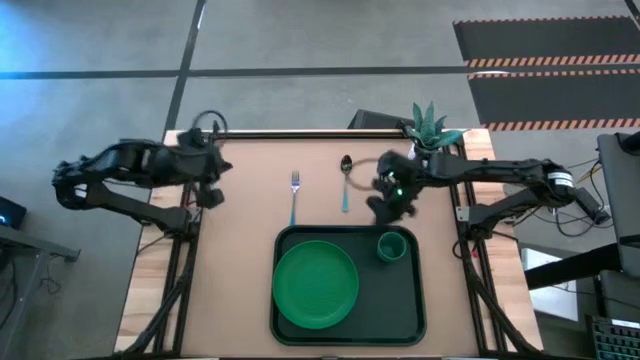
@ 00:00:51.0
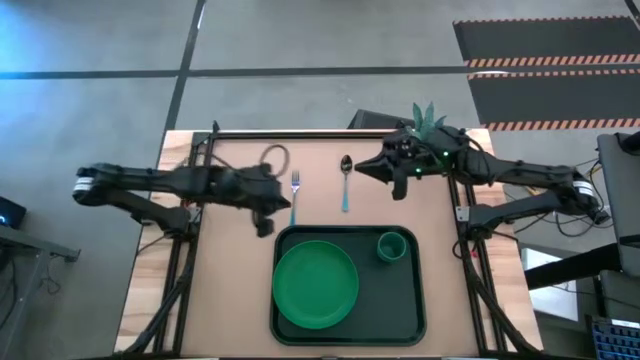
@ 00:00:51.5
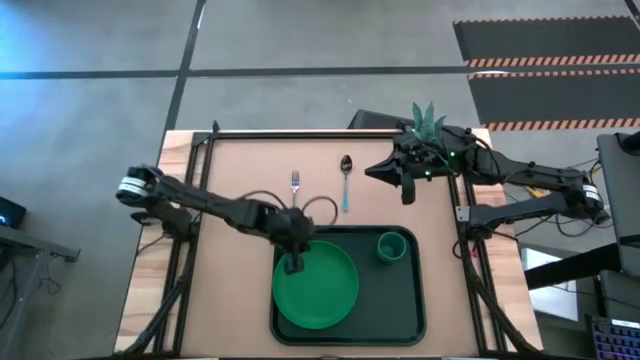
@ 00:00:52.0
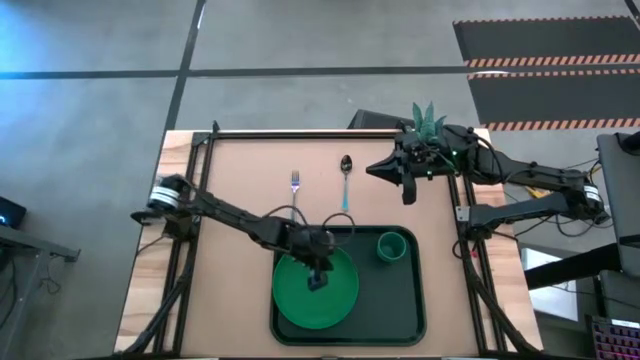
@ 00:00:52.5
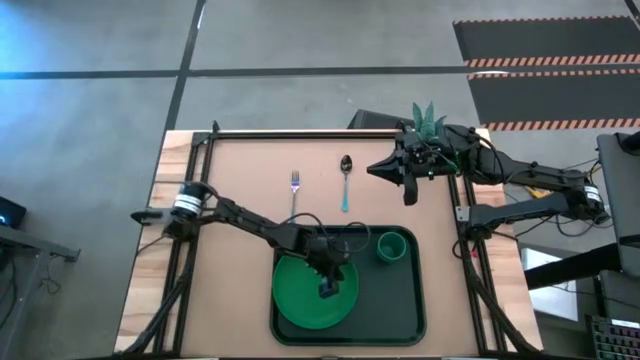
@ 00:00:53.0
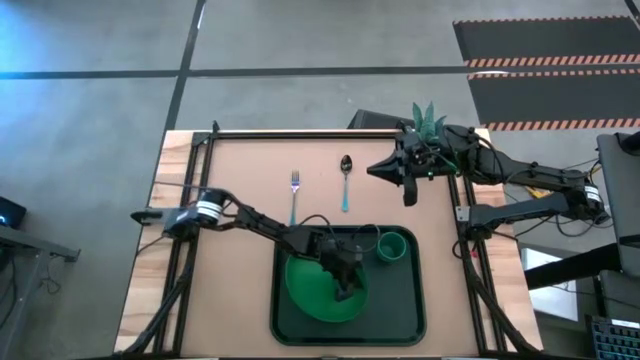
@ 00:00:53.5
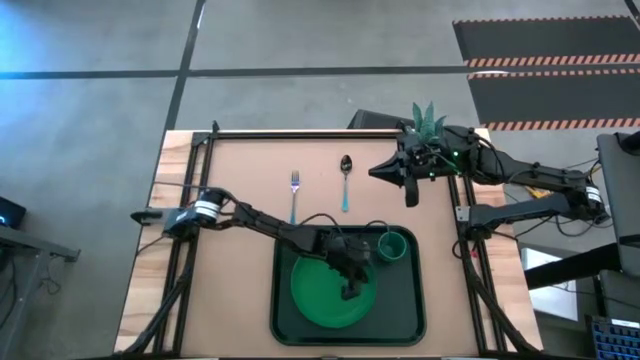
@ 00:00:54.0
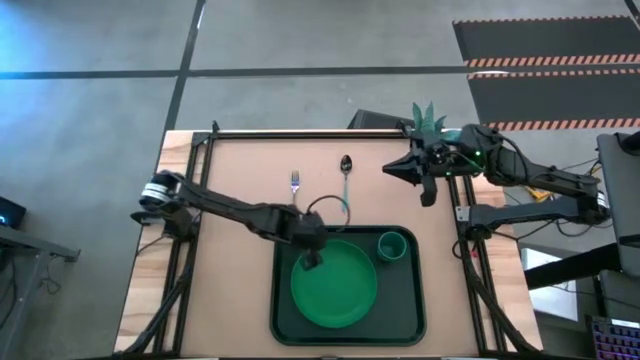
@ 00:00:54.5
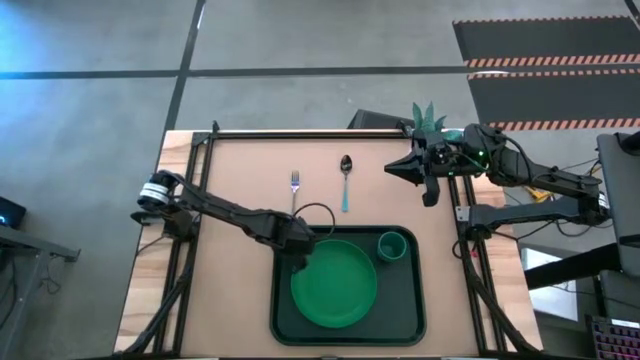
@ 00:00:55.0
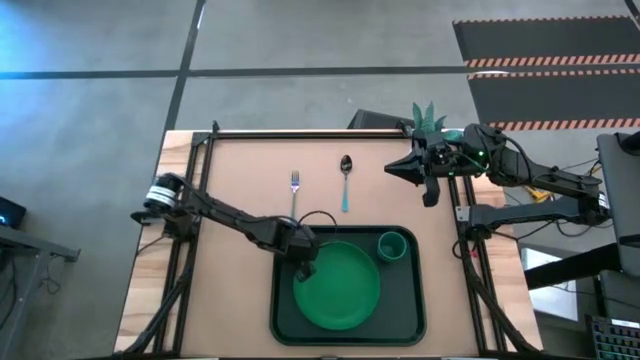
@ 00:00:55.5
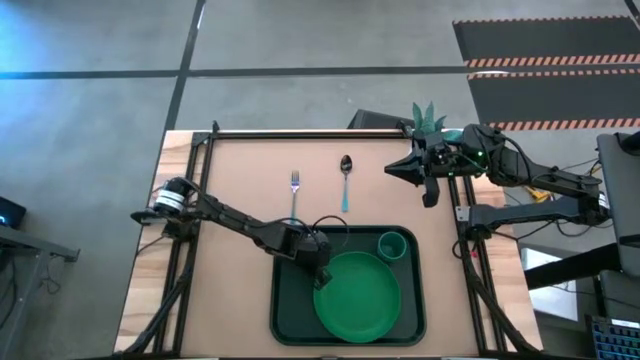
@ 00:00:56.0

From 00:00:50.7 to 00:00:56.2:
Task: Pick and place plate/cup/fork/spoon on tray
Adjust the green plate on the tray

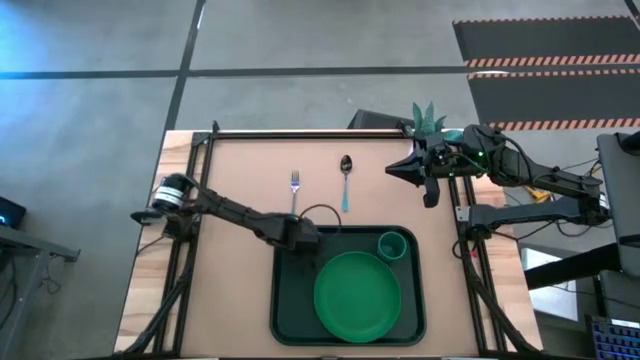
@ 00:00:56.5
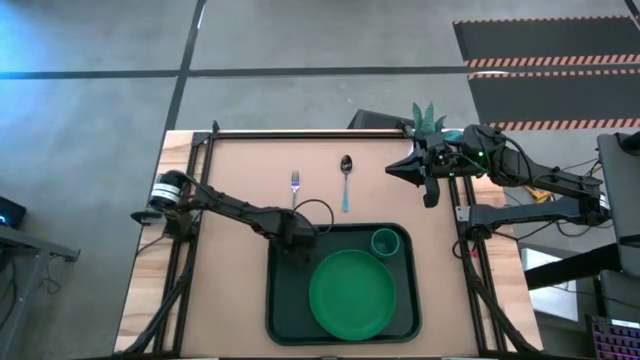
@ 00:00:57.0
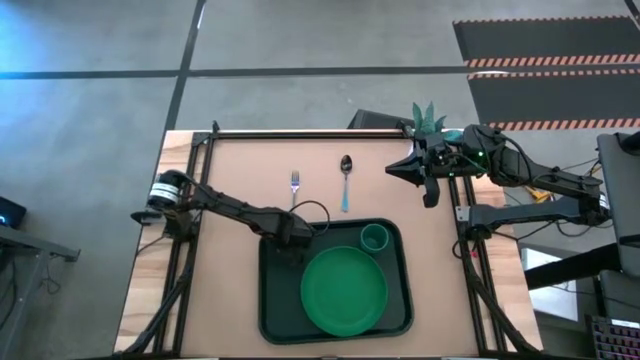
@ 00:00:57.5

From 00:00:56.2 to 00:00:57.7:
Adjust the green tray

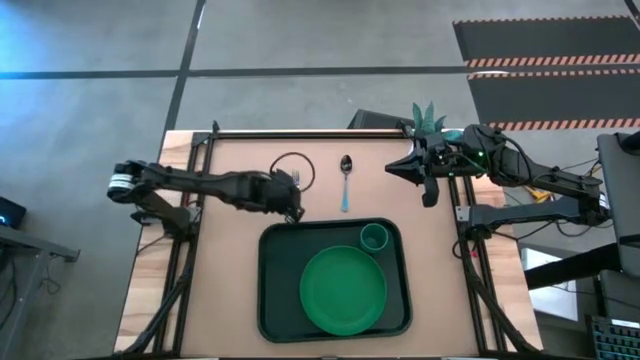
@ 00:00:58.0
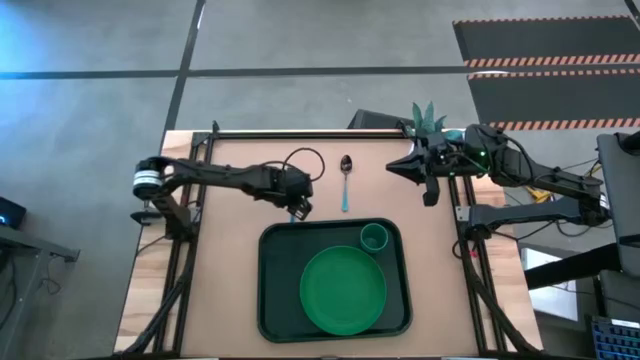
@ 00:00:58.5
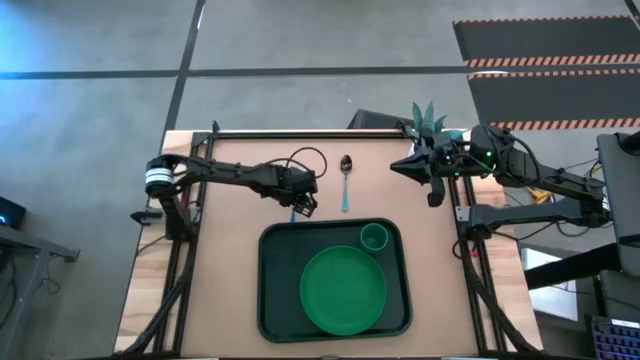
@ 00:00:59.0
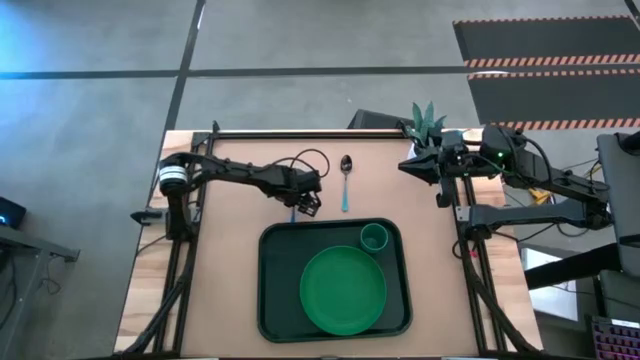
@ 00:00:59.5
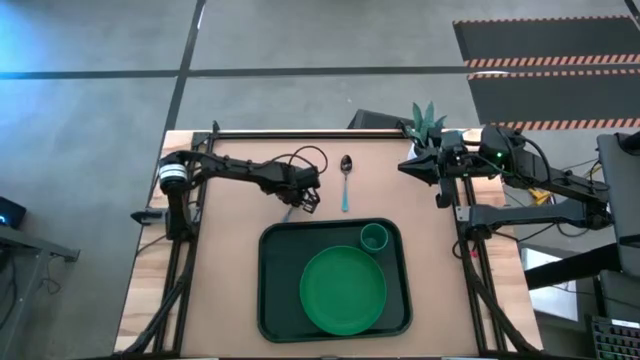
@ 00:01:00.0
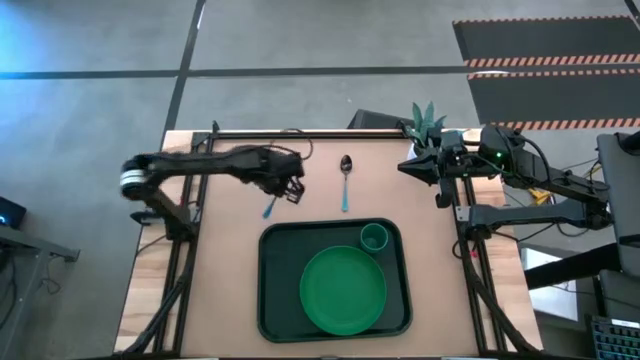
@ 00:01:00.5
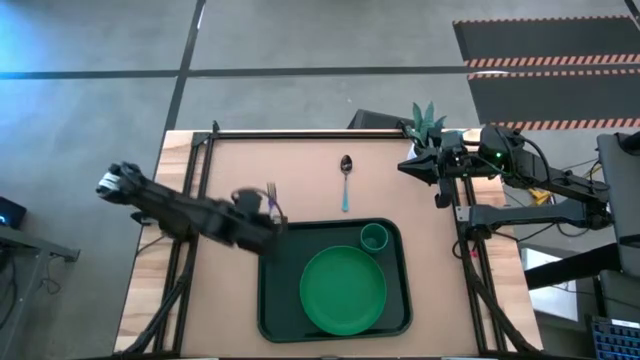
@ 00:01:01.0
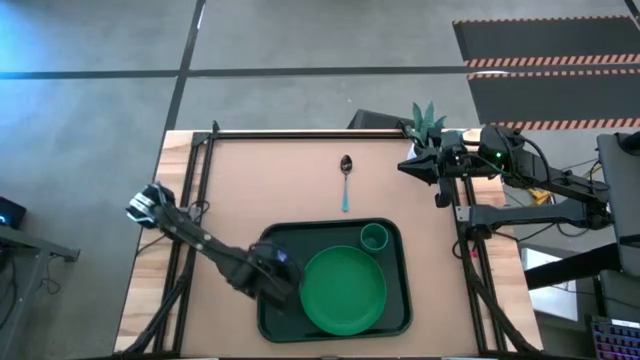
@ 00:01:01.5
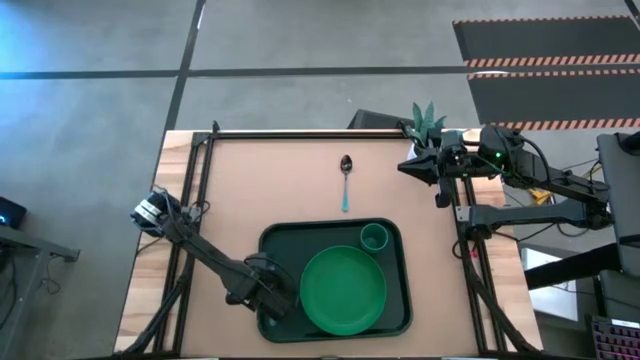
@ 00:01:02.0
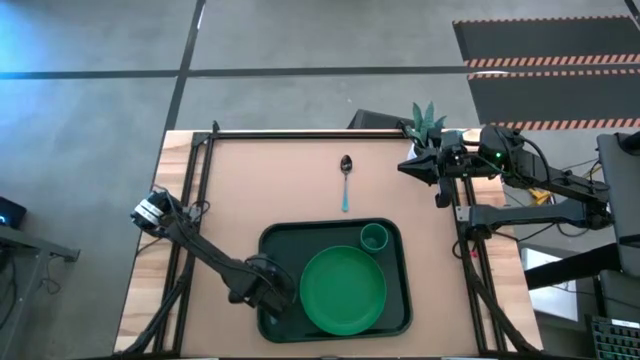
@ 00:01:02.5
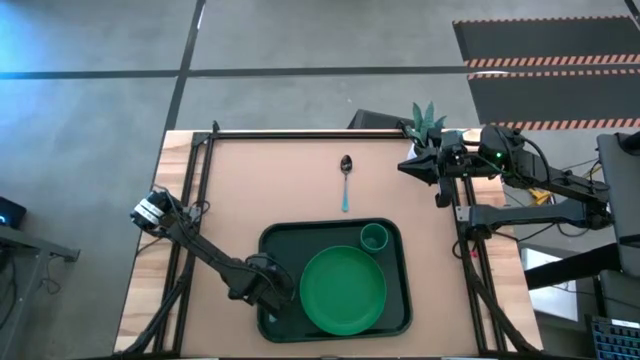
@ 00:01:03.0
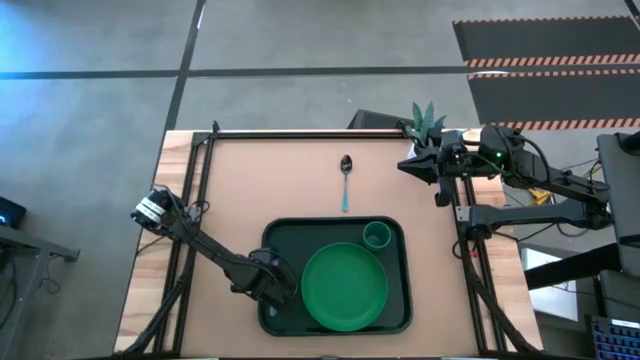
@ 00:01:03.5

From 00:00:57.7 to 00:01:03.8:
Put the blue fork on the green tray to the left of the green plate

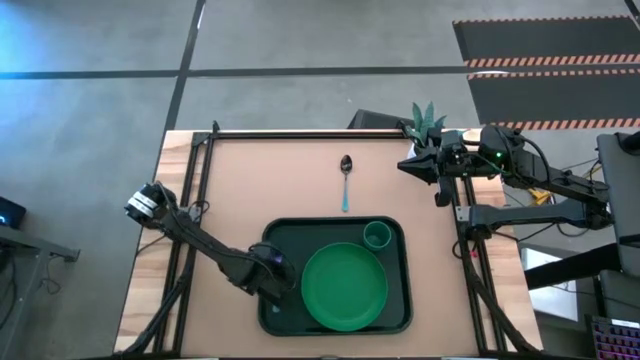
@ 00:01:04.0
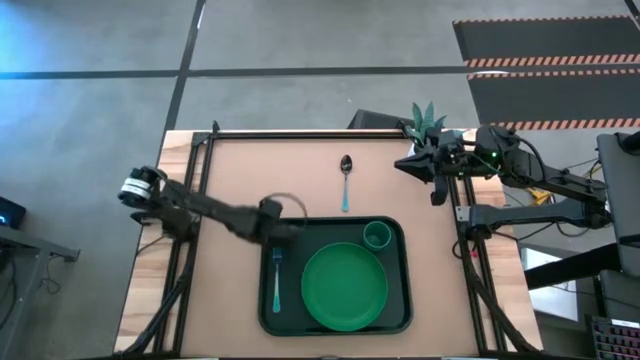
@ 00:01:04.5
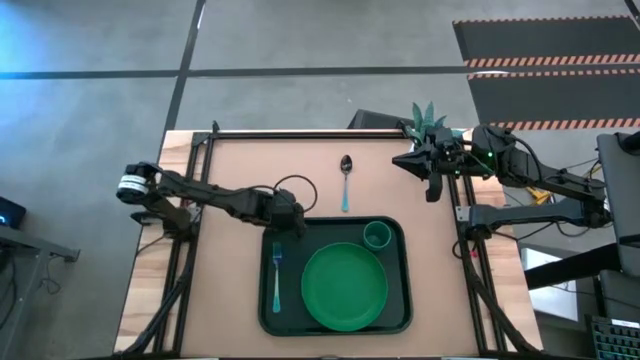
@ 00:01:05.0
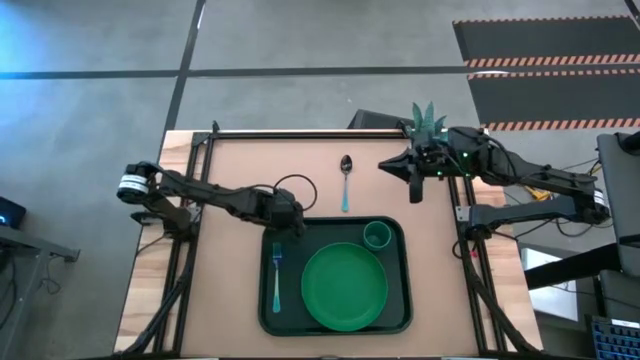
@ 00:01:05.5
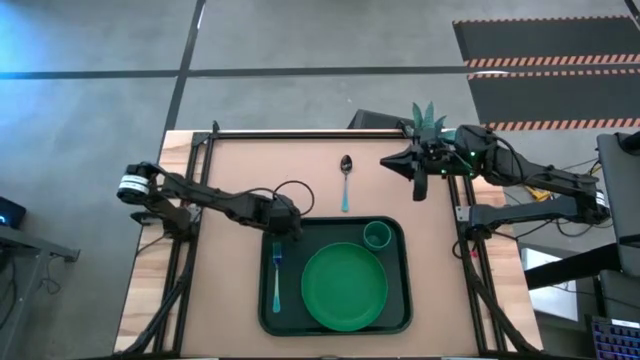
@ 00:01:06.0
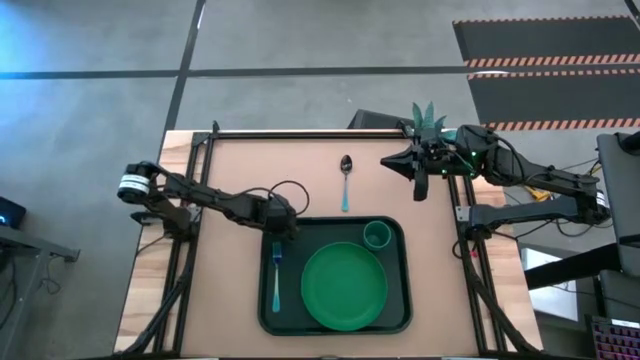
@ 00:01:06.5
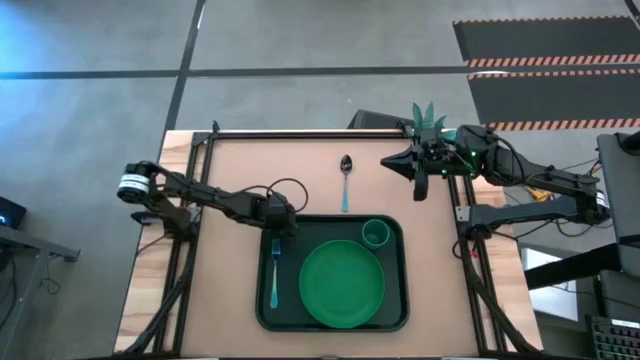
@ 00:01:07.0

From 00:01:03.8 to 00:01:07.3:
Adjust the green tray

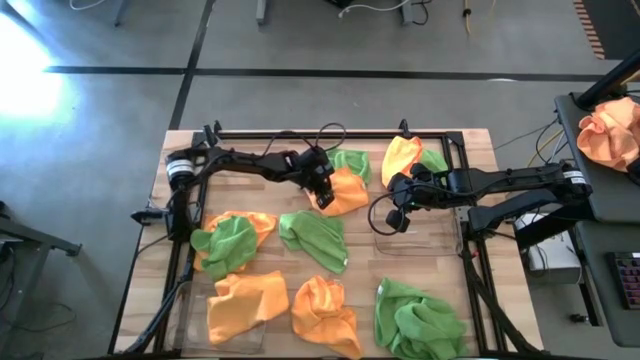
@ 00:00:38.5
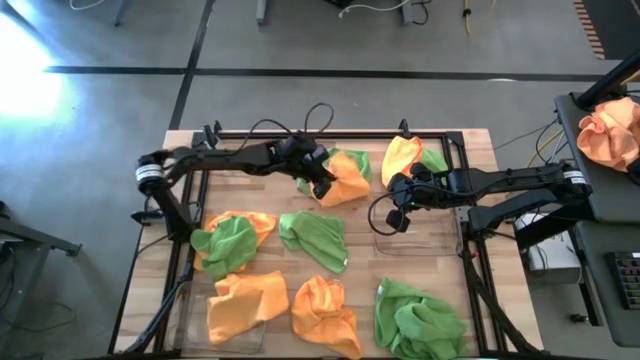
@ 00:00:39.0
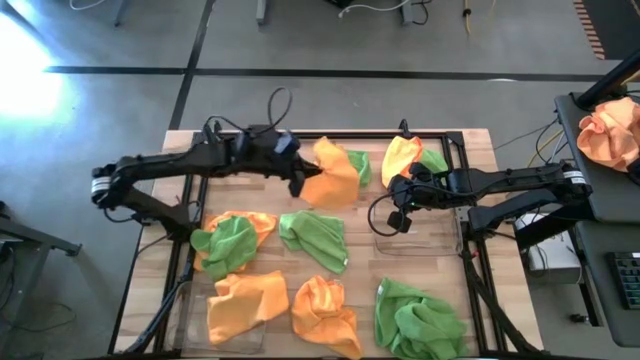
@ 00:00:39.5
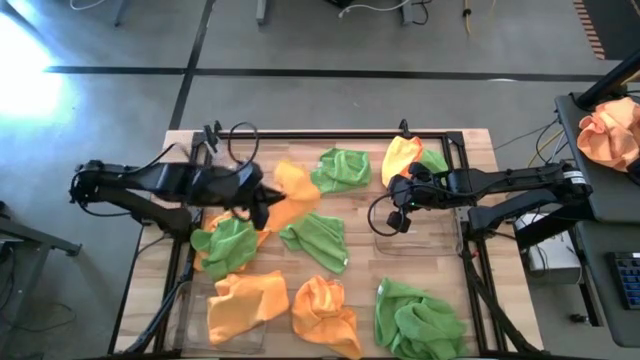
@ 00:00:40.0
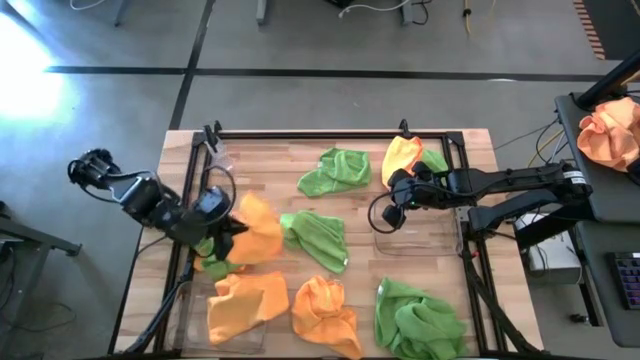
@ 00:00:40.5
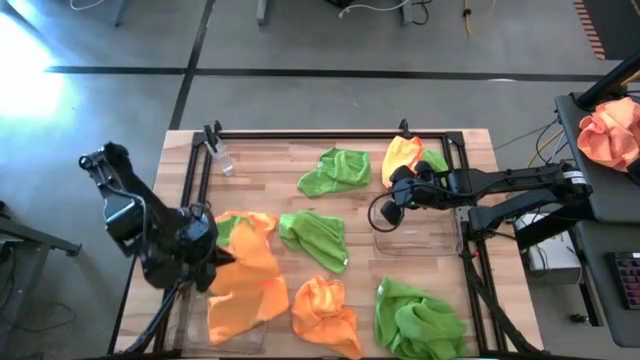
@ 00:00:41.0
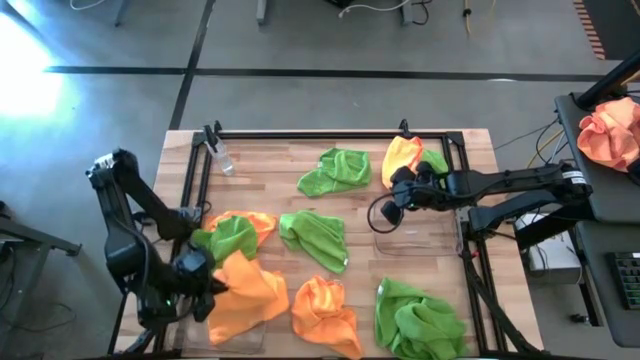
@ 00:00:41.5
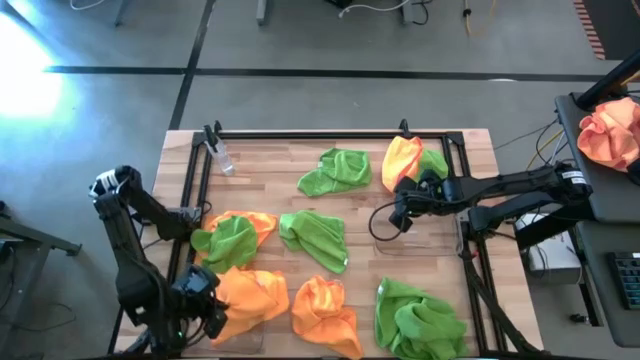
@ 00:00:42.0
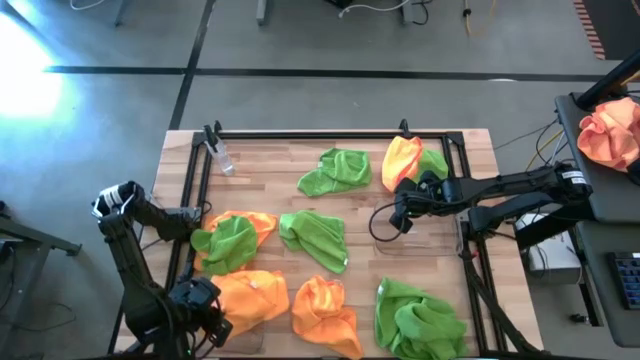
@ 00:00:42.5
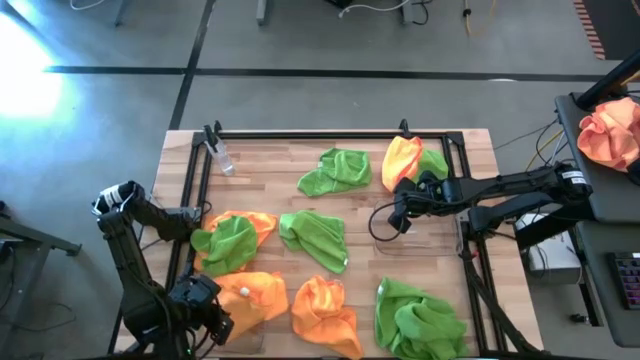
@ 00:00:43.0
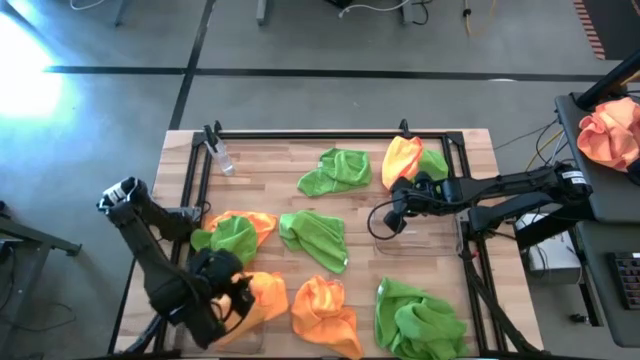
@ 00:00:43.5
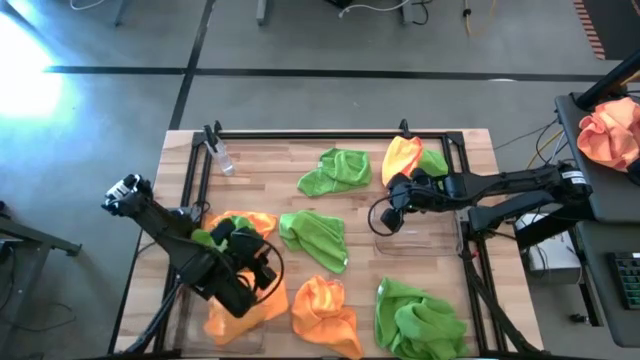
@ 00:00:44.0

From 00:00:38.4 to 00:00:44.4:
Task: Sort microfiber towel by color & place in baskets
Put the top center yellow towel into the left transparent bin
